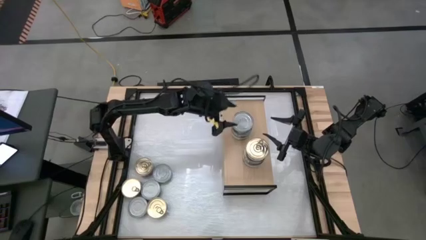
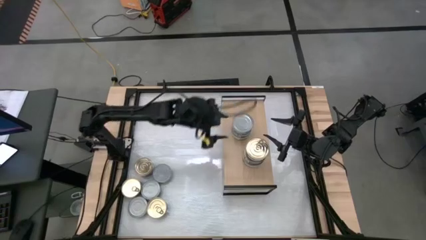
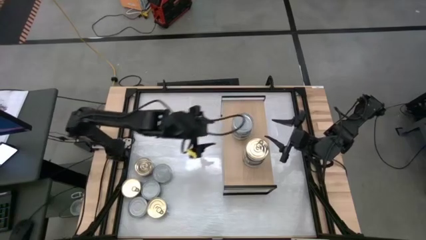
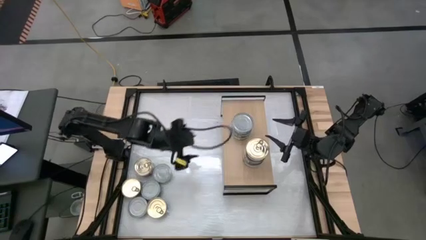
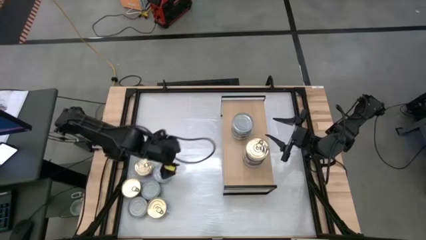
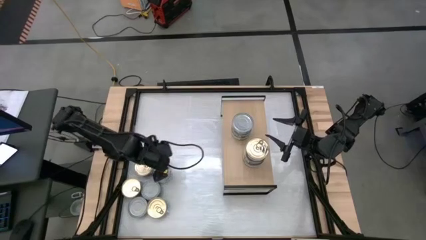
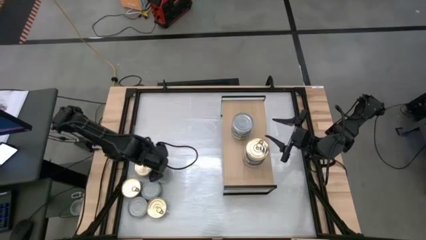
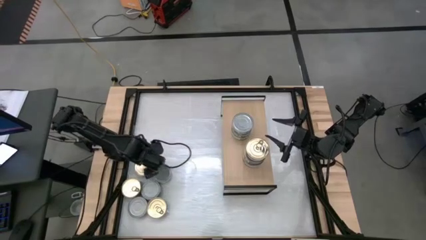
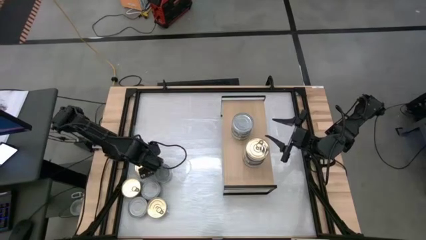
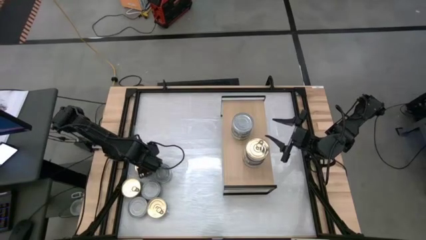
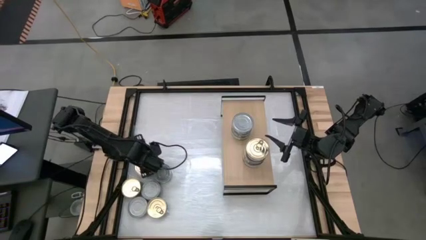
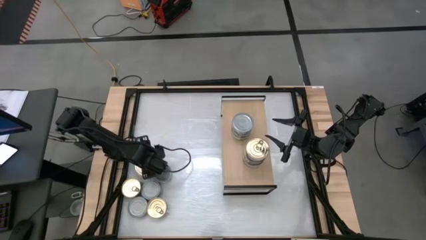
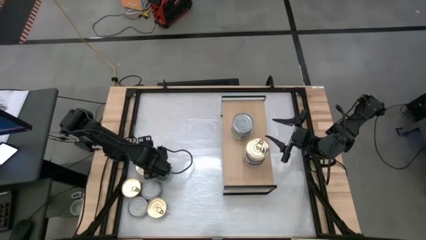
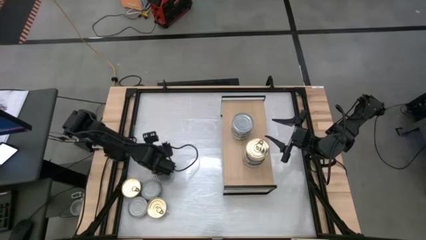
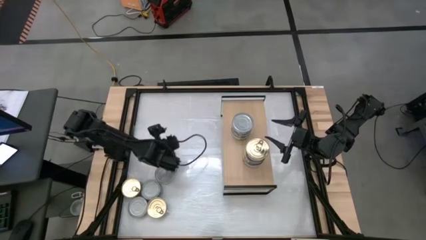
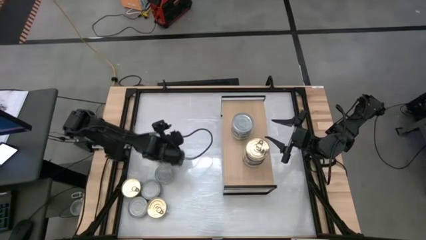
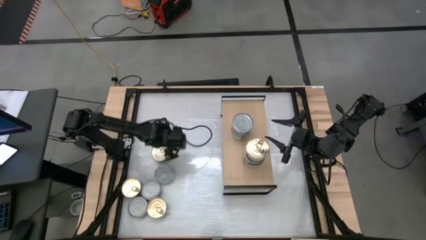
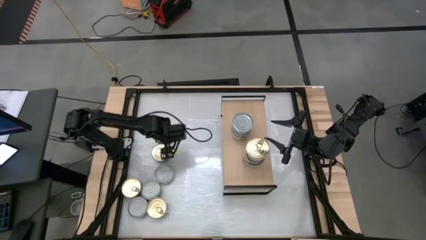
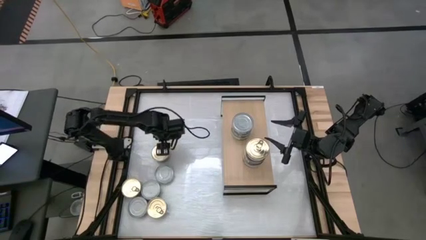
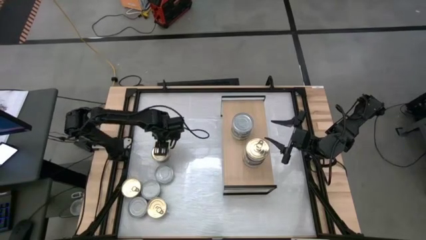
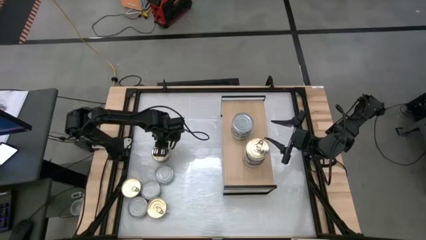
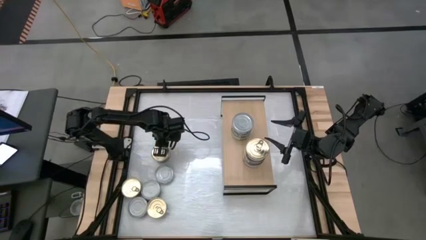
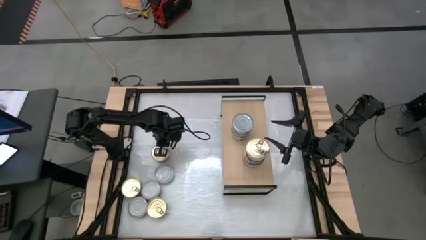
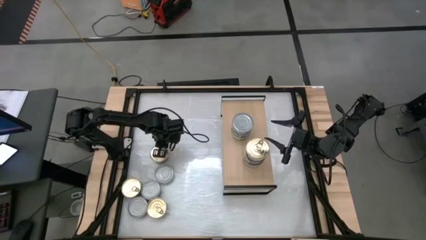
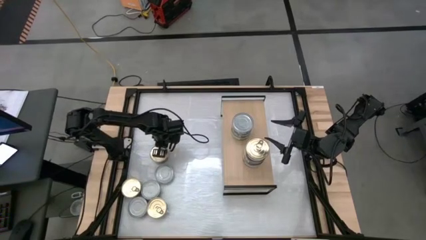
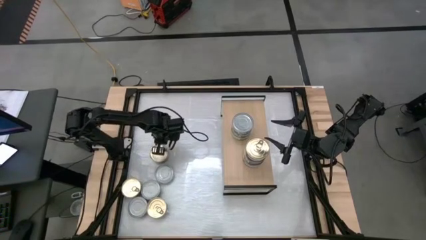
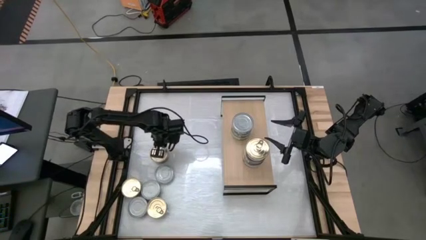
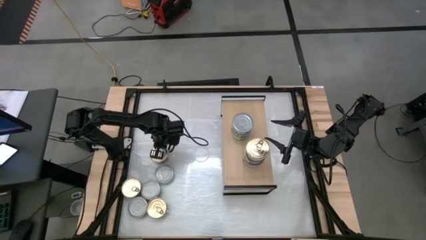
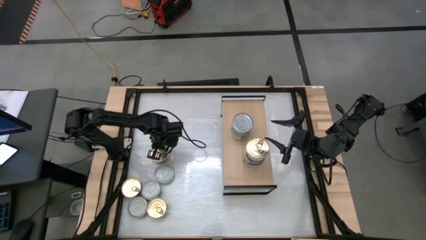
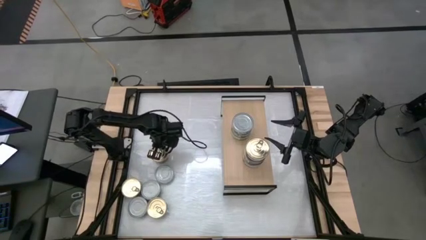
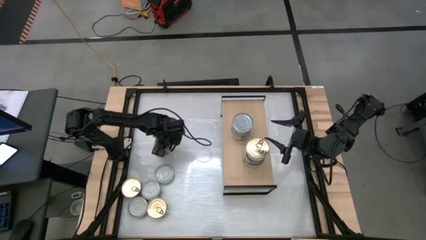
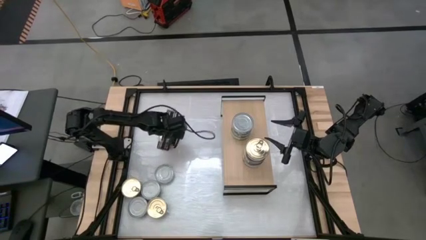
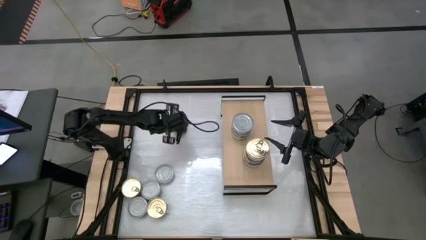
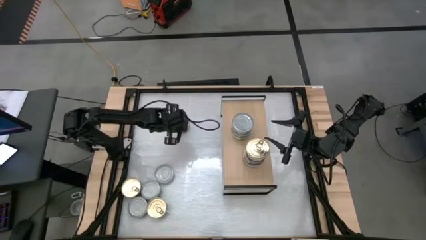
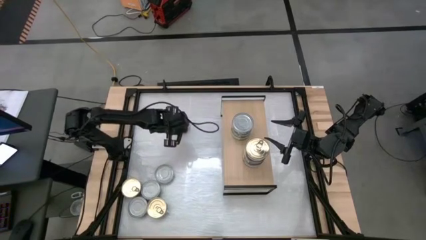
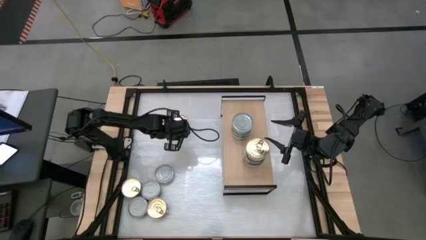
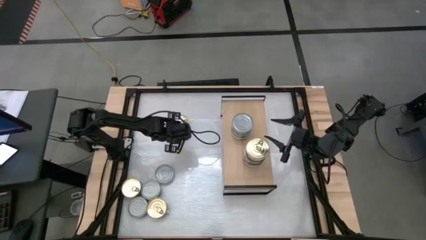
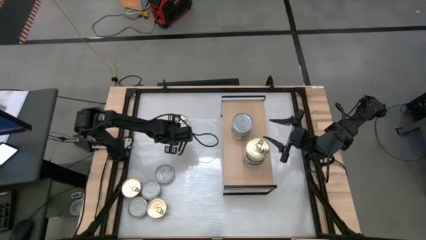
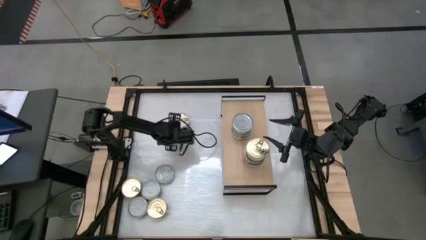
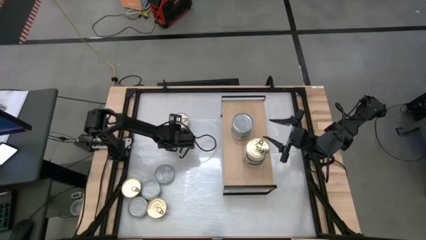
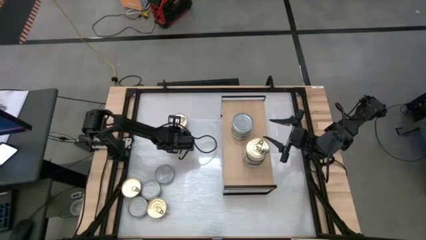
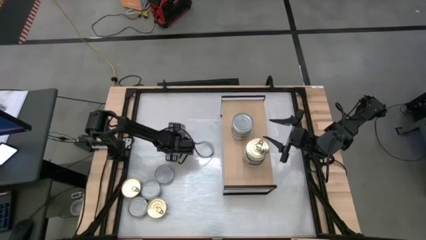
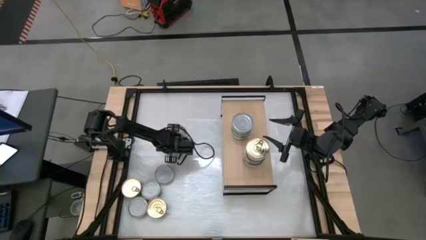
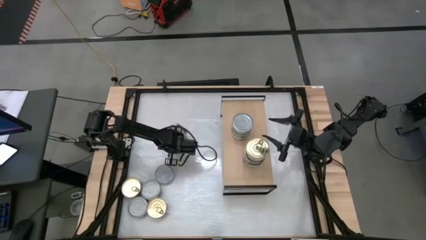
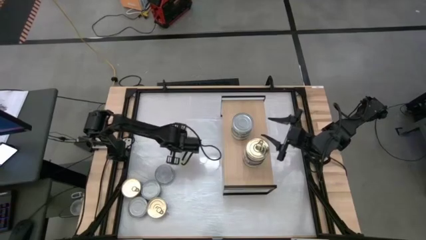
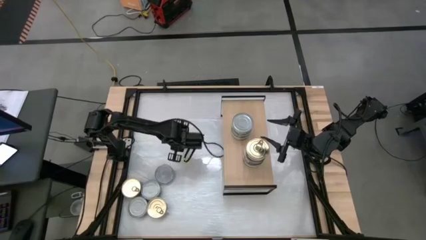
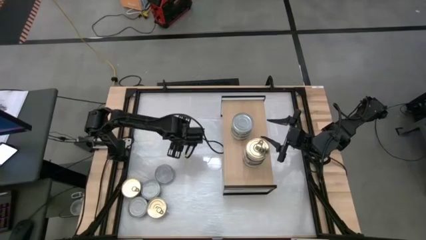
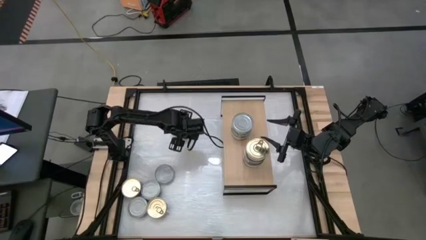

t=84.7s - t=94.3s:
Task: Stack canned seafood by type on shelf
Stack the blue tuna can on top of the blue tuna can

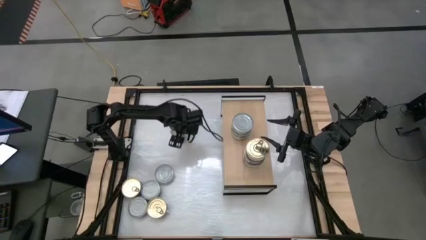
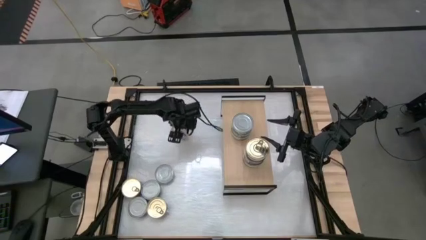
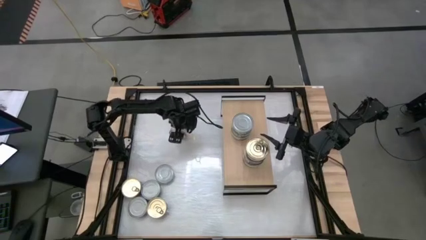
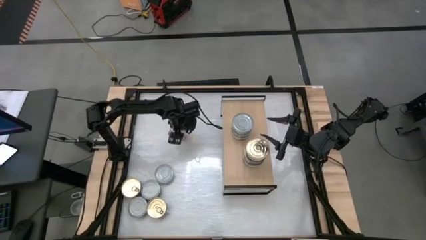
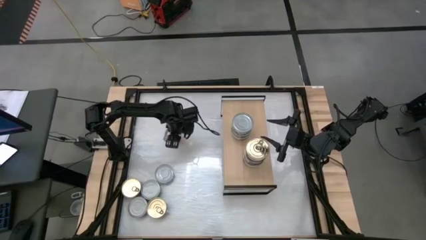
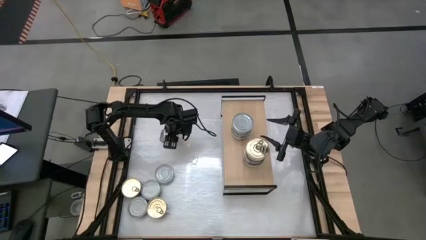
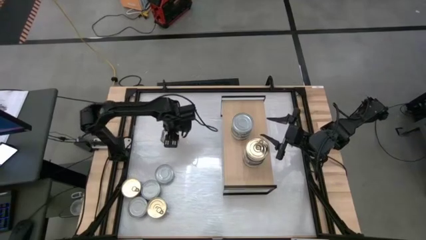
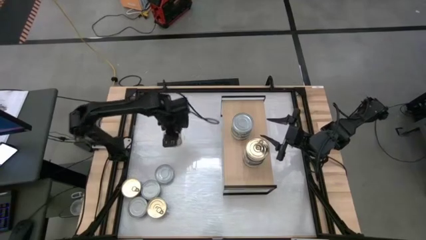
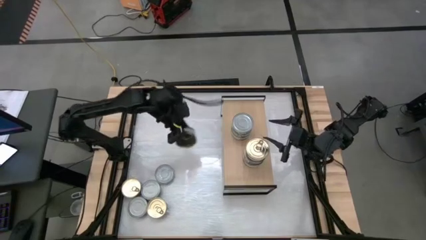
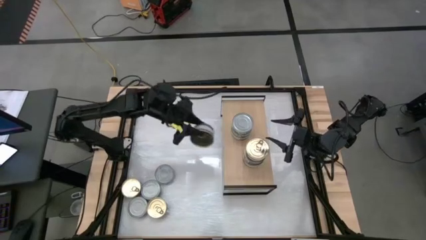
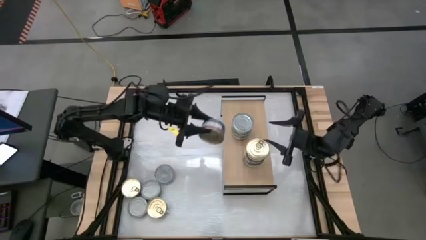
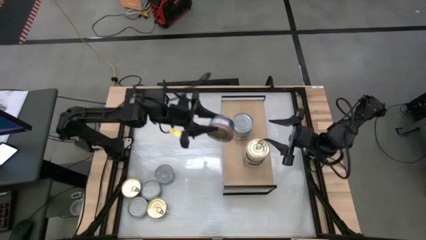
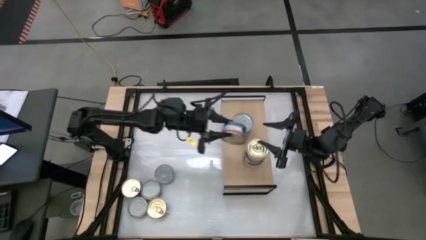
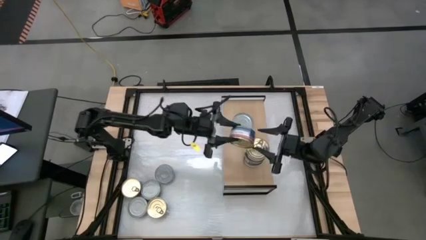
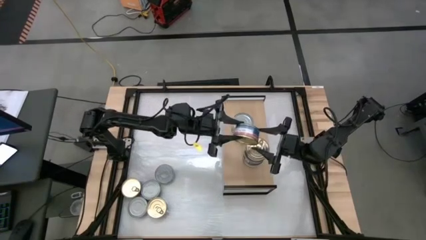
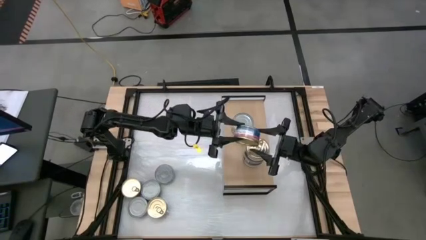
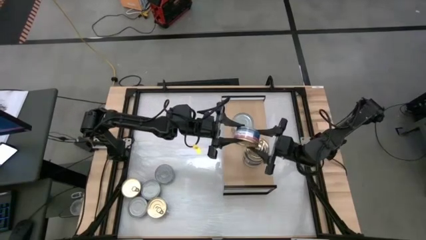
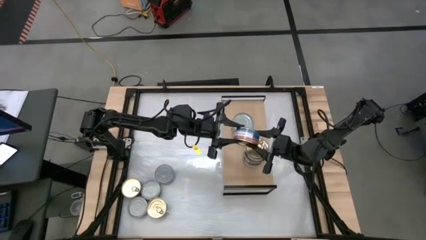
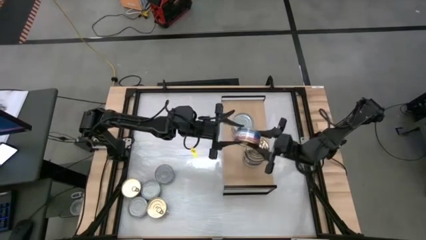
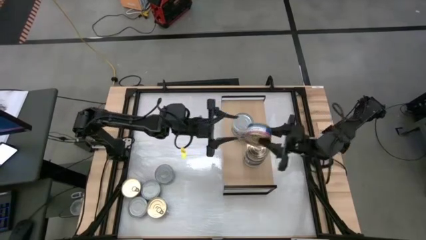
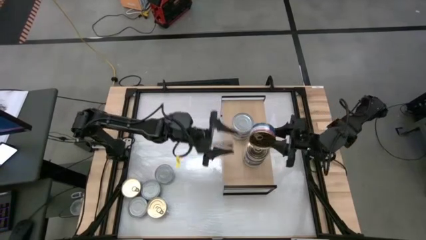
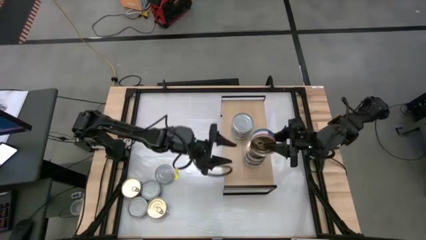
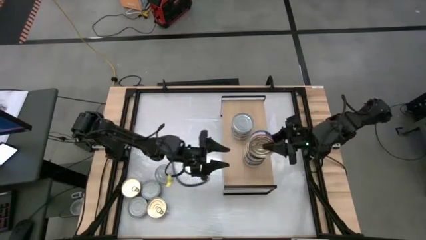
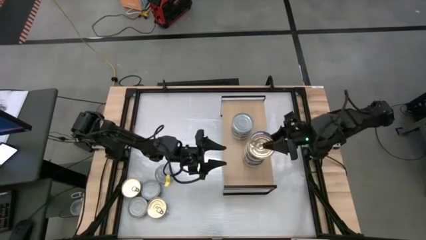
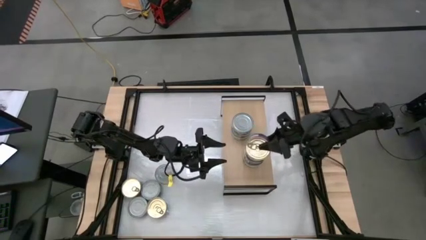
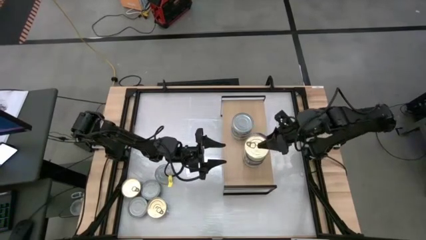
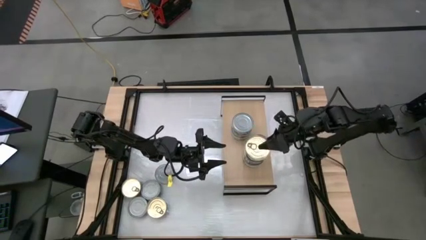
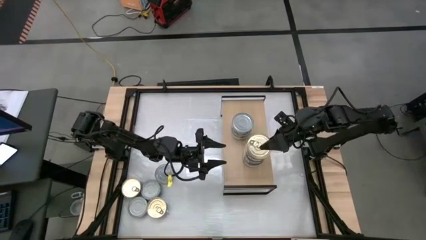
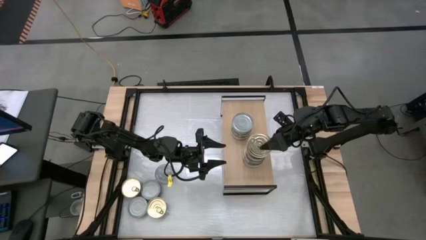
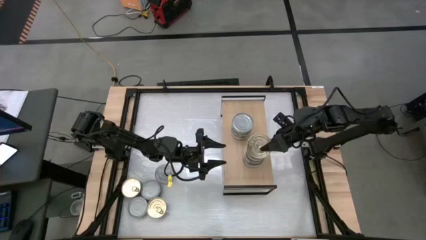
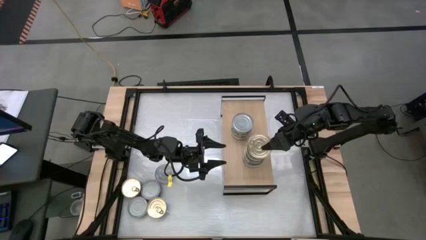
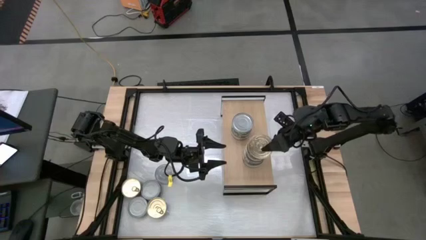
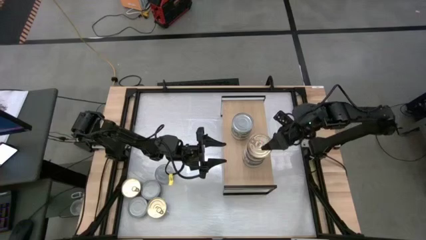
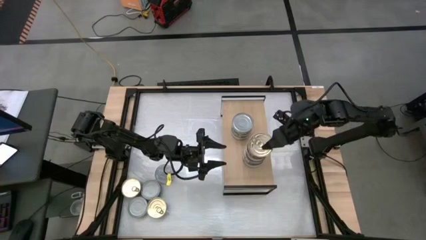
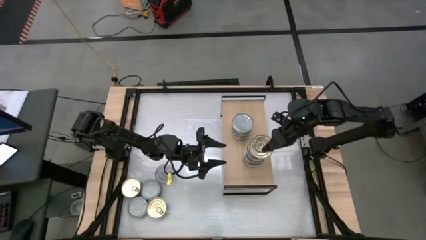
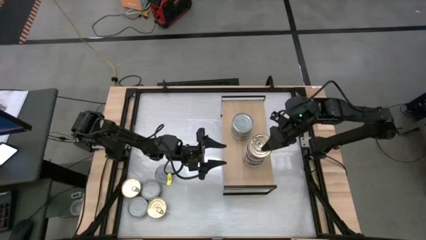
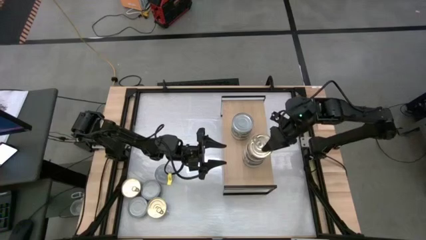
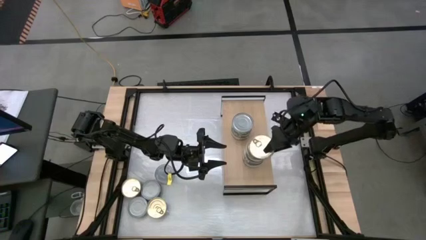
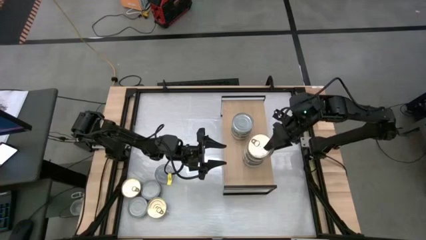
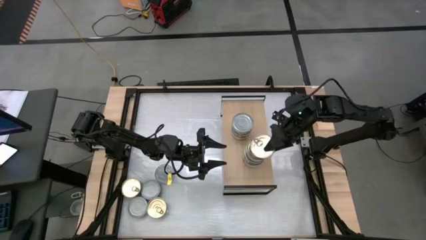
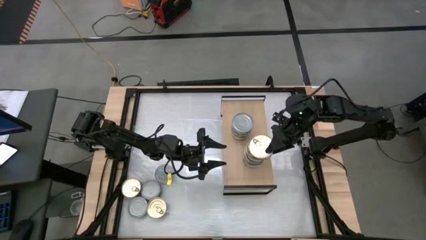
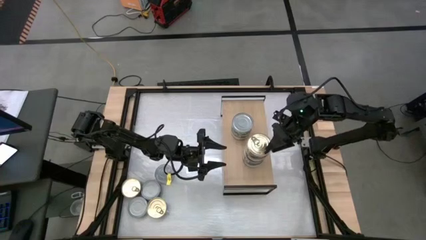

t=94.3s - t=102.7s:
Stack the blue tuna can on top of the blue tuna can
